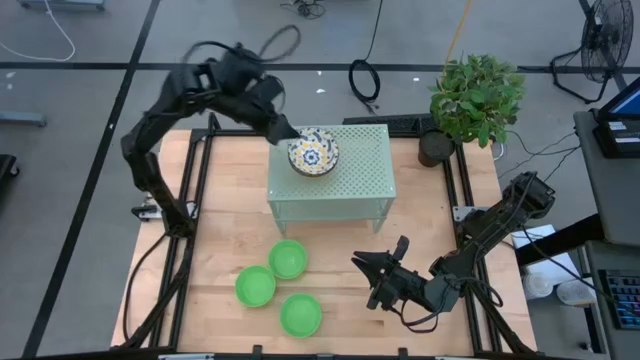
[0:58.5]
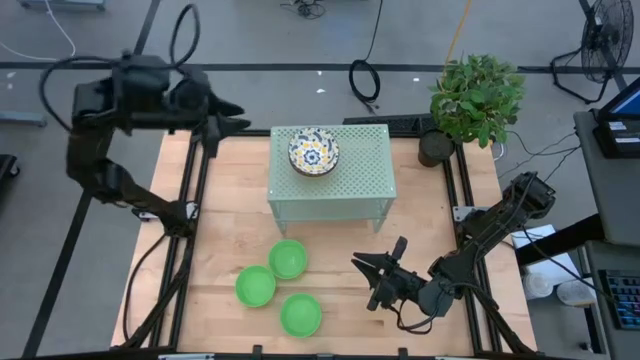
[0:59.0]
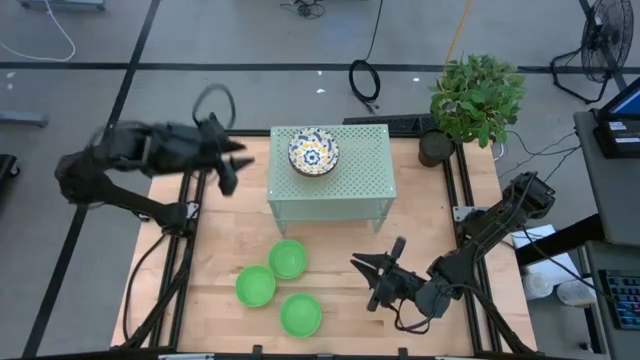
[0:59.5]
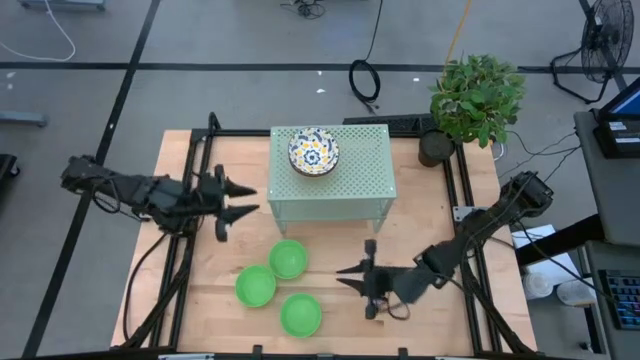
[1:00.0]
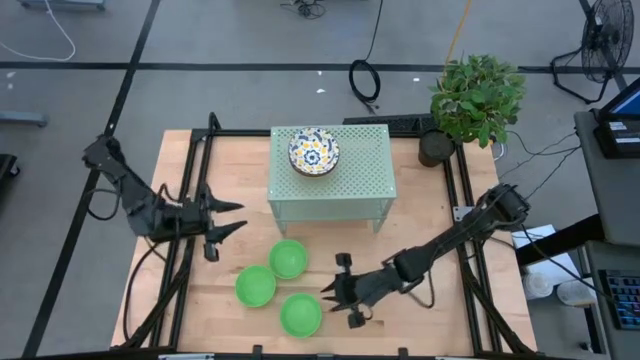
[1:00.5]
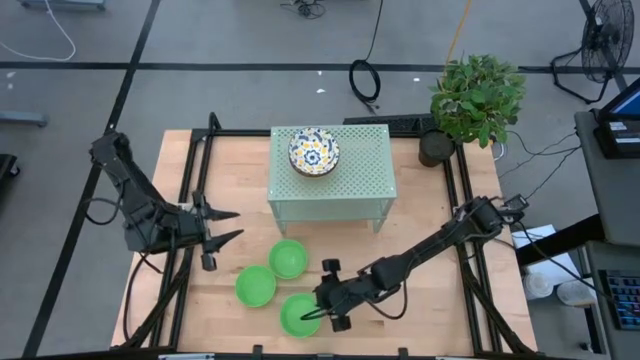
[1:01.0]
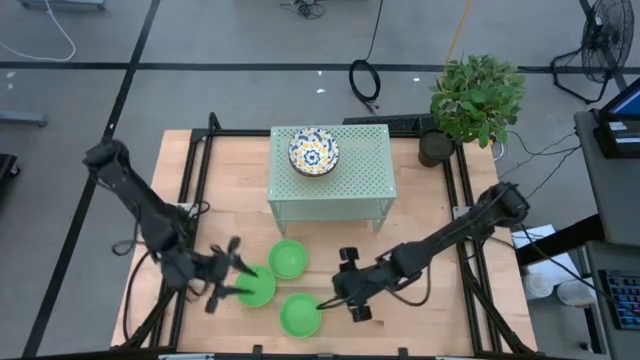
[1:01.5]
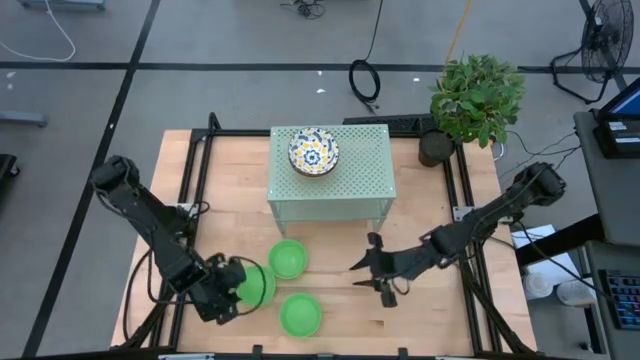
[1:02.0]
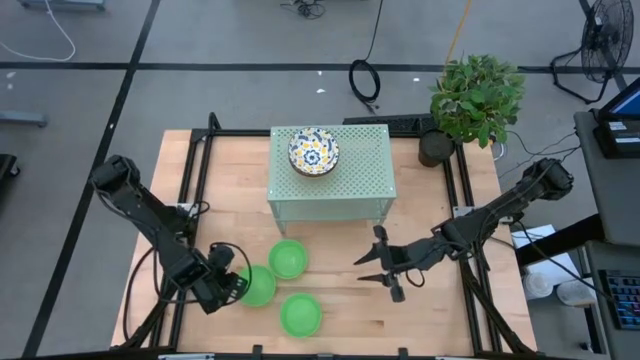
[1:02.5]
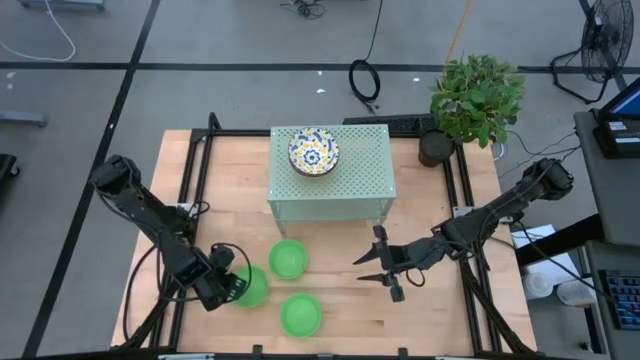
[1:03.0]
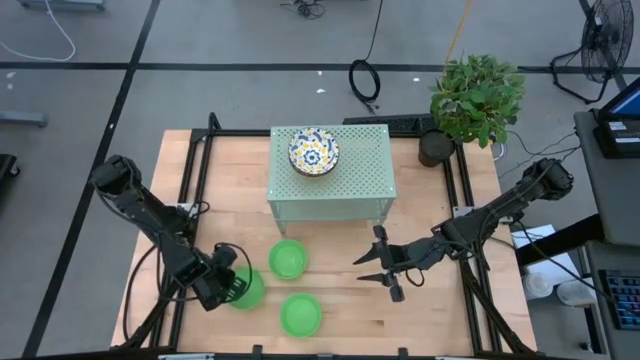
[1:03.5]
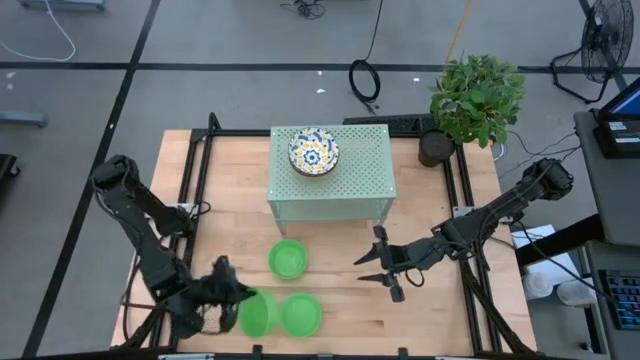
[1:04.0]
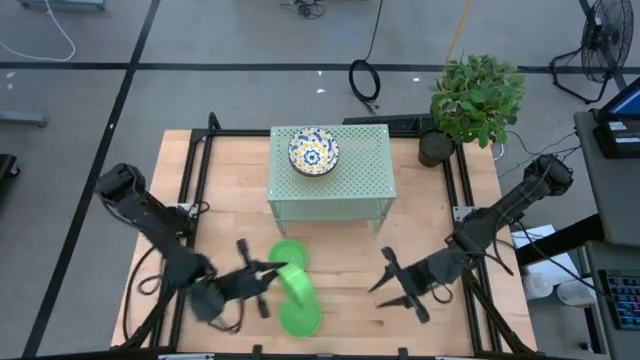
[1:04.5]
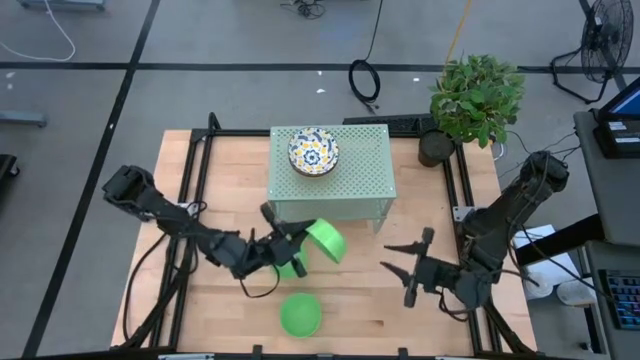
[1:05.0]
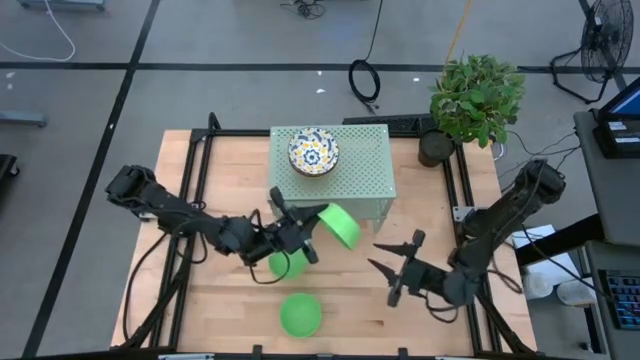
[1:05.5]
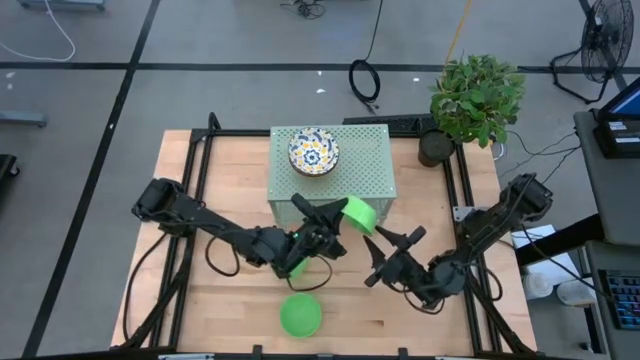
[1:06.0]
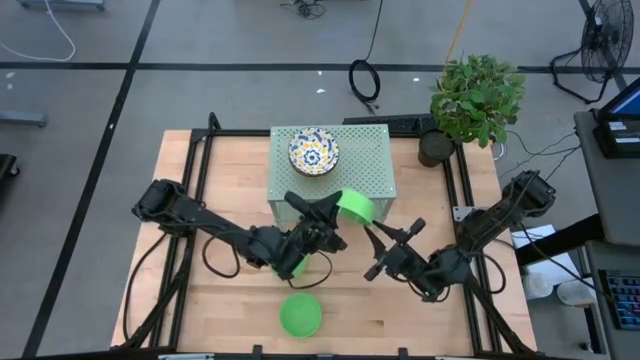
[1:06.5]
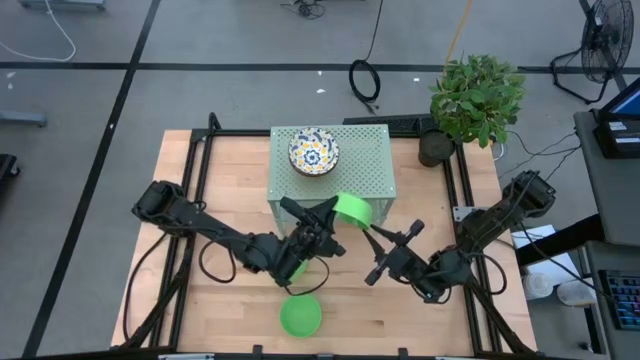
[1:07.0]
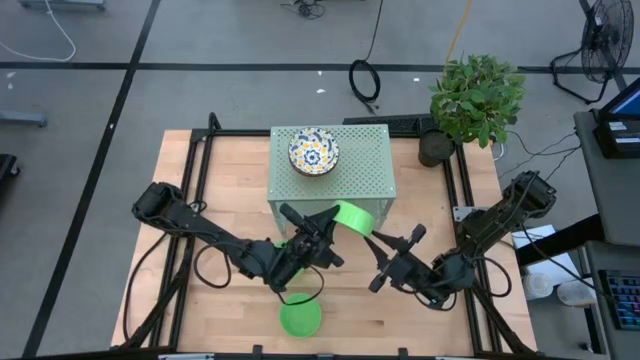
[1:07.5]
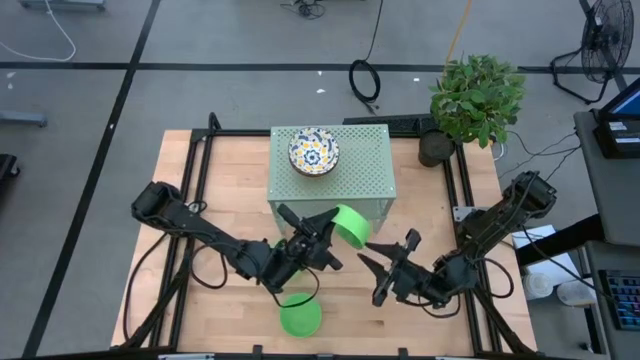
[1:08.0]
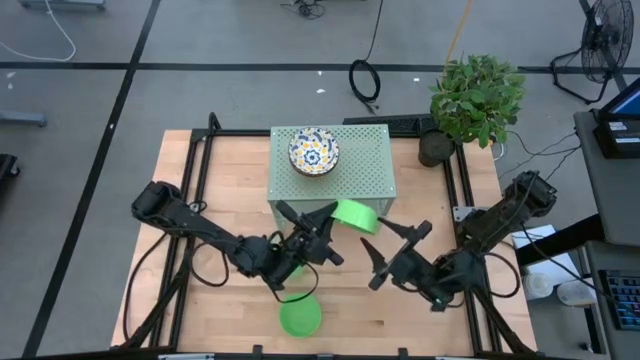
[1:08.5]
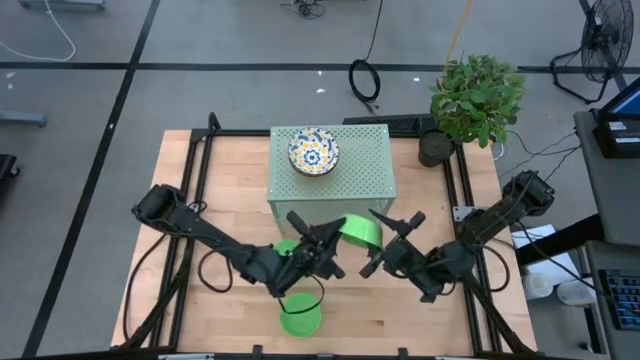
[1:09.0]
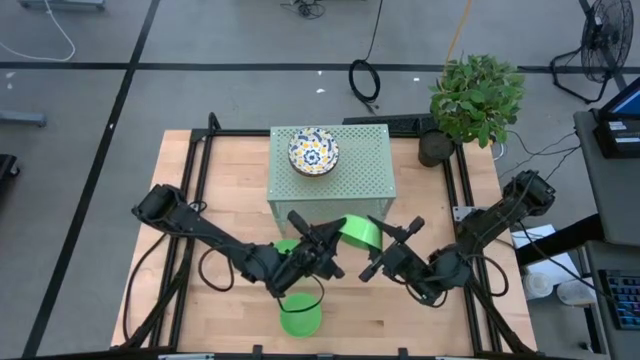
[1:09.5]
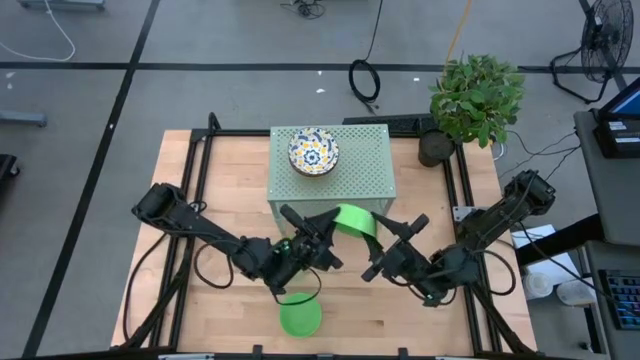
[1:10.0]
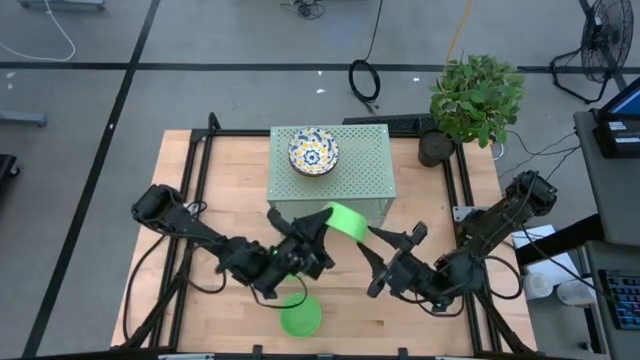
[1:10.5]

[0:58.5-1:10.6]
Task: Pick & Place Mini bowls
Put the middle green bowl on the shelf

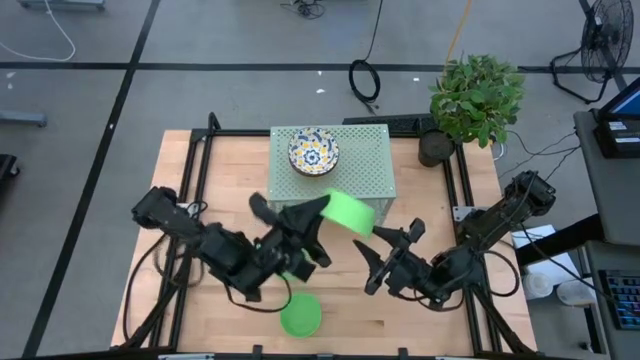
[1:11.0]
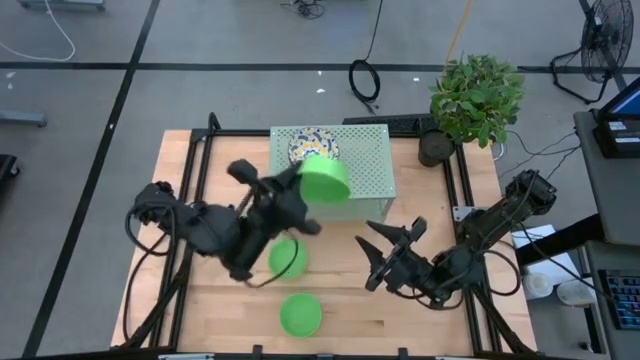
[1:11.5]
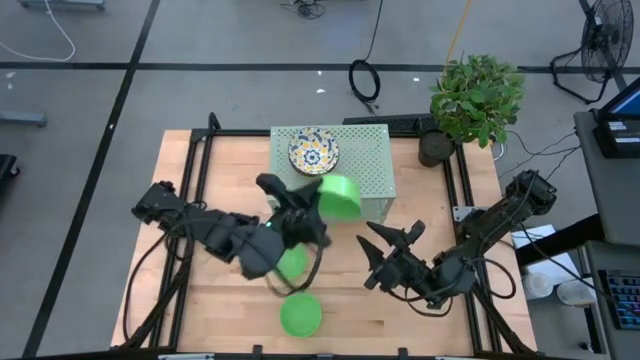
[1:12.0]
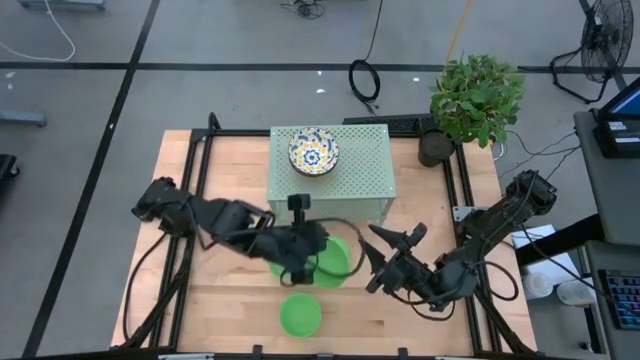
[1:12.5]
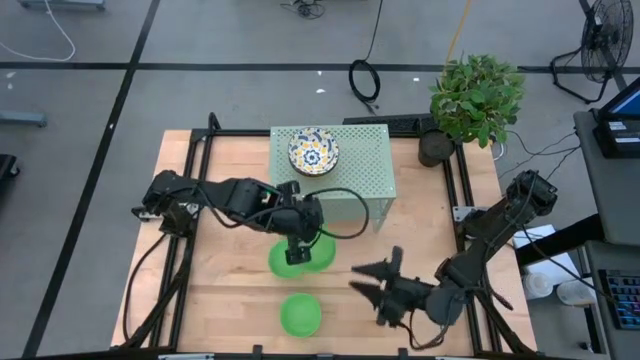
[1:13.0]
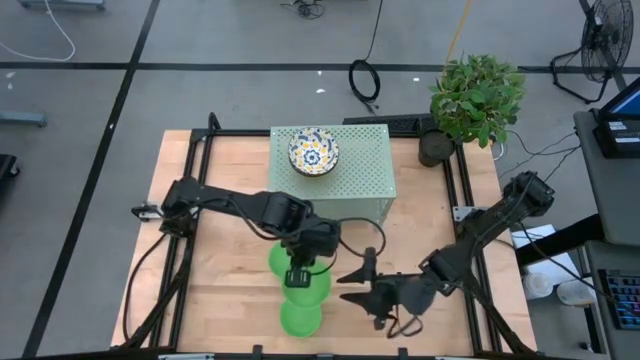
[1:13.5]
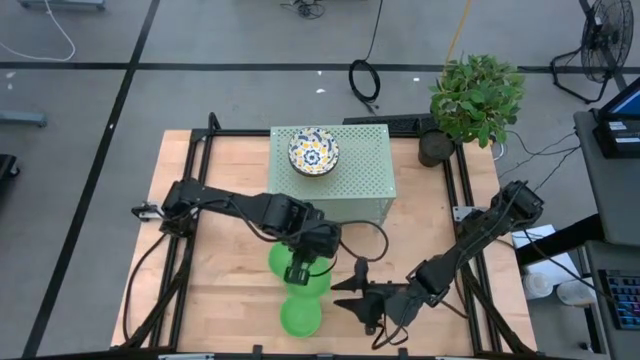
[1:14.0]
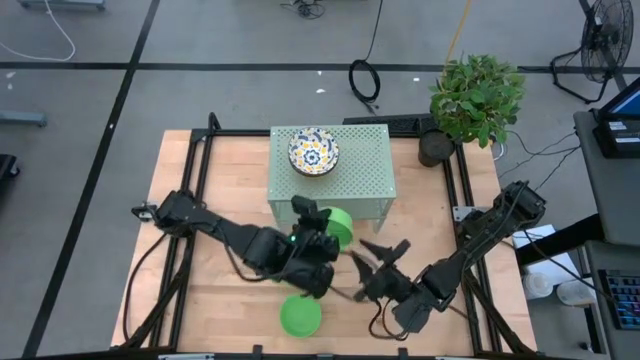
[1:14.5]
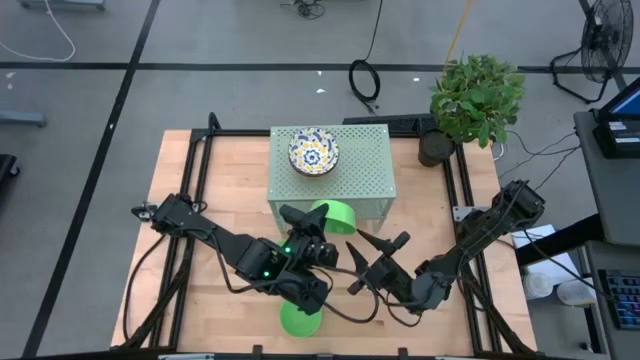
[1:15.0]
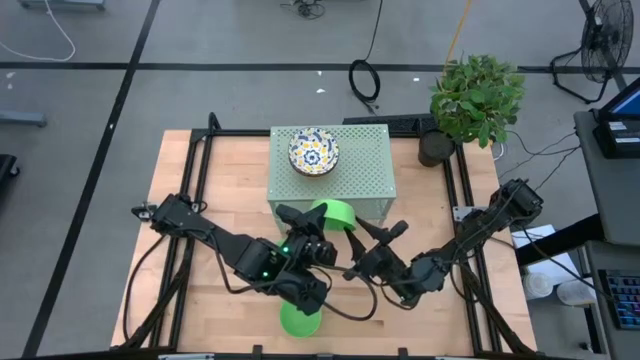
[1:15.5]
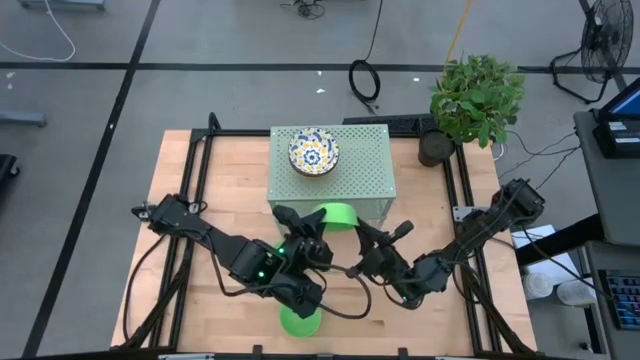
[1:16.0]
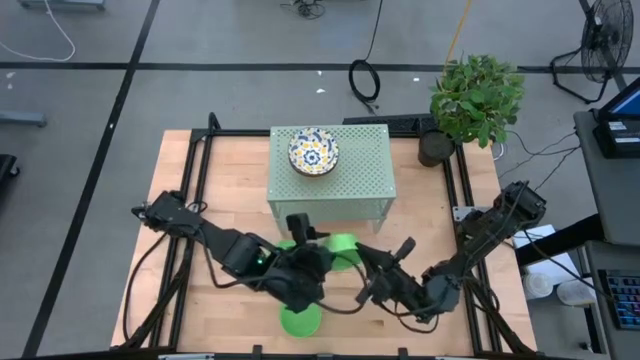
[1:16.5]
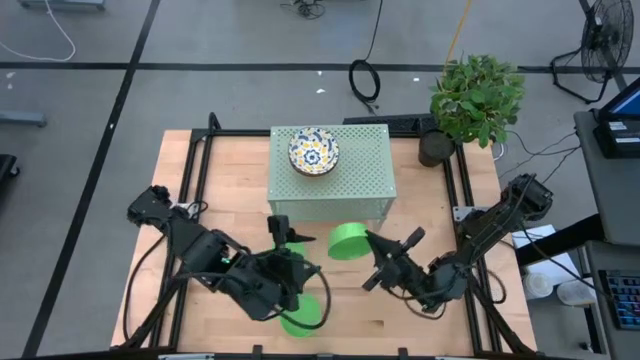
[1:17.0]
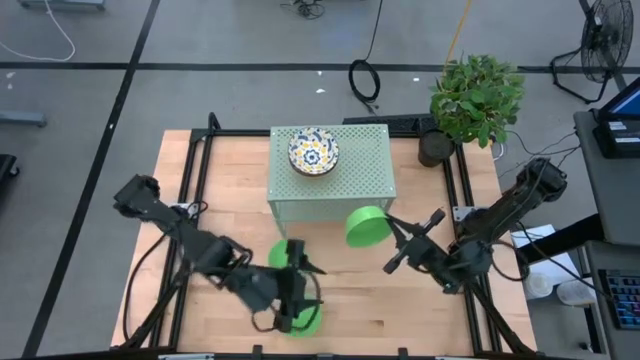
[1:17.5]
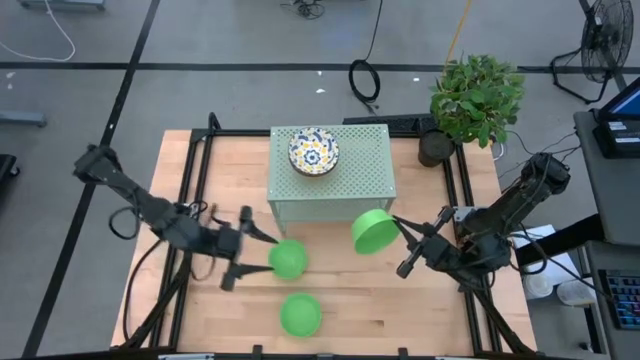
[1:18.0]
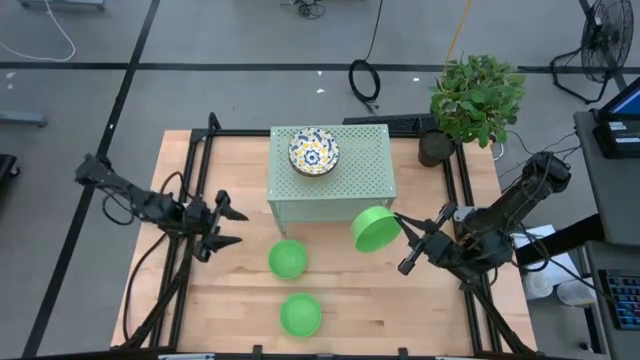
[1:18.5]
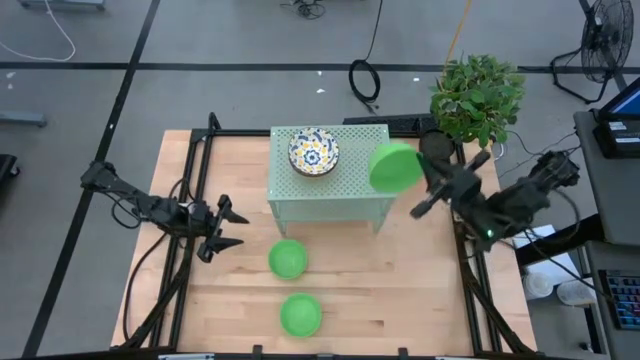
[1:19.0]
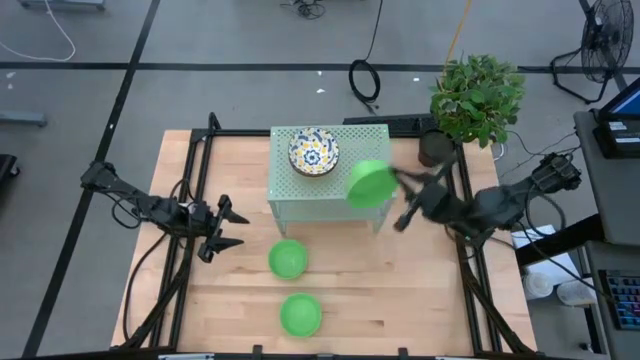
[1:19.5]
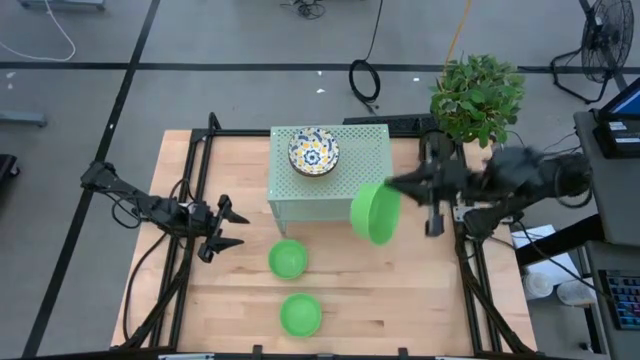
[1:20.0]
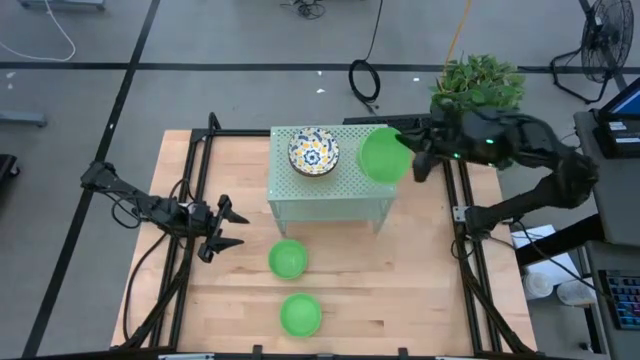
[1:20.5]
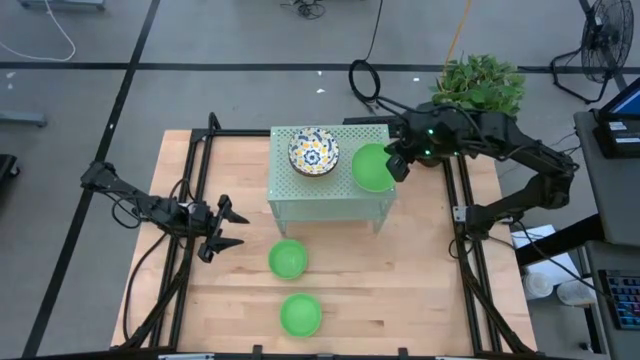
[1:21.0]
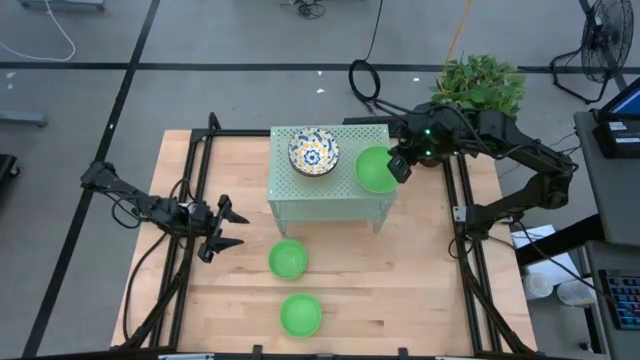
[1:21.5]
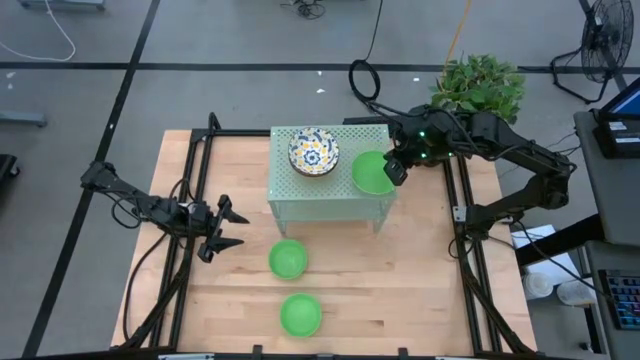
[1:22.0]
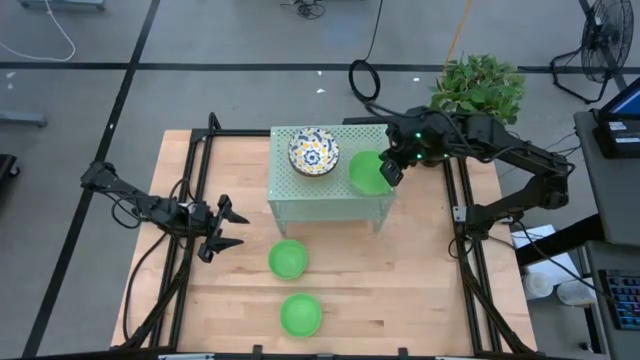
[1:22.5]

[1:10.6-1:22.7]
Put the middle green bowl on the shelf
